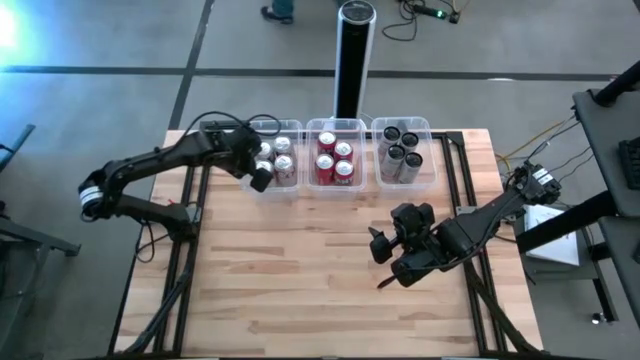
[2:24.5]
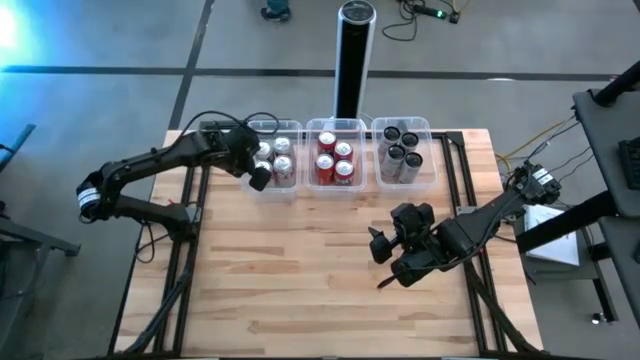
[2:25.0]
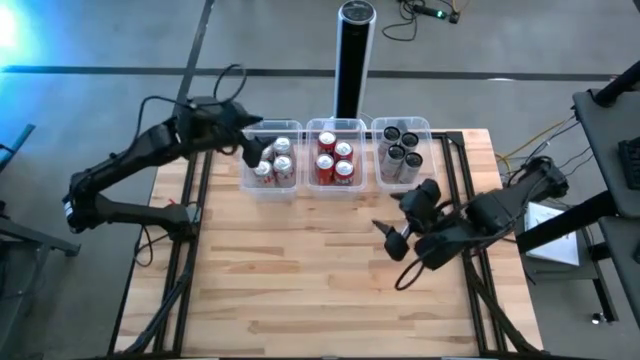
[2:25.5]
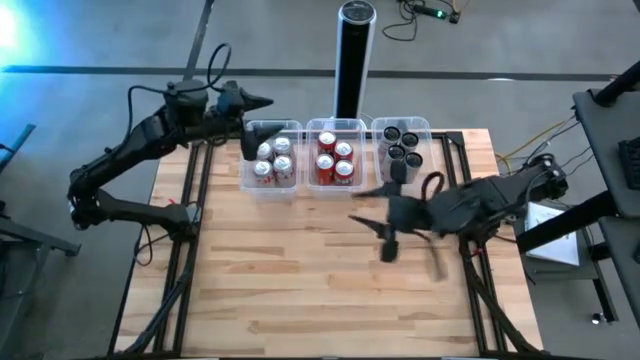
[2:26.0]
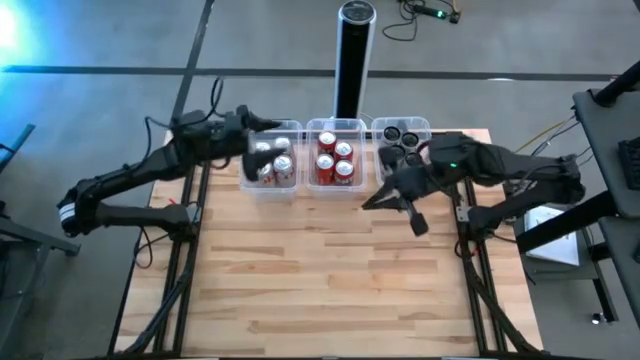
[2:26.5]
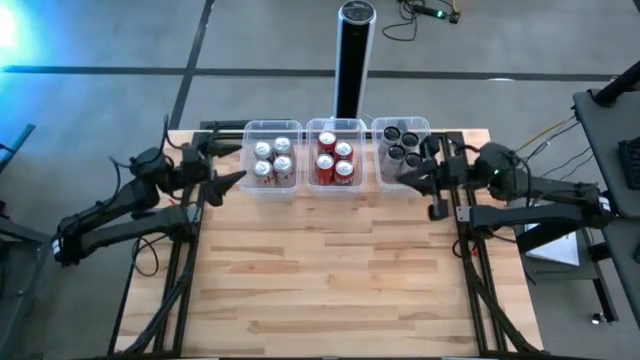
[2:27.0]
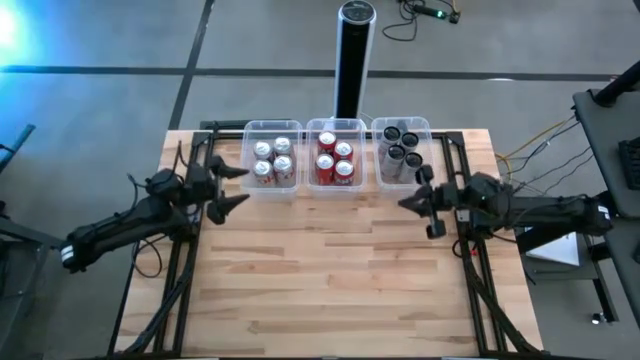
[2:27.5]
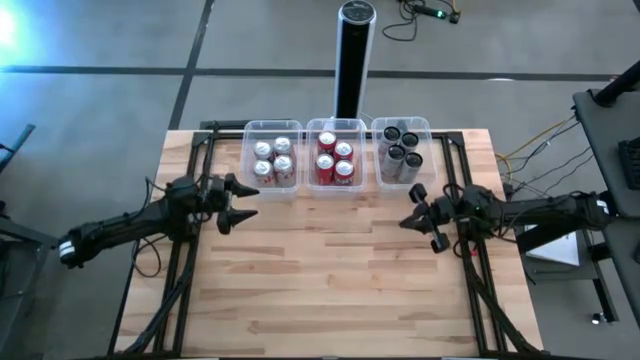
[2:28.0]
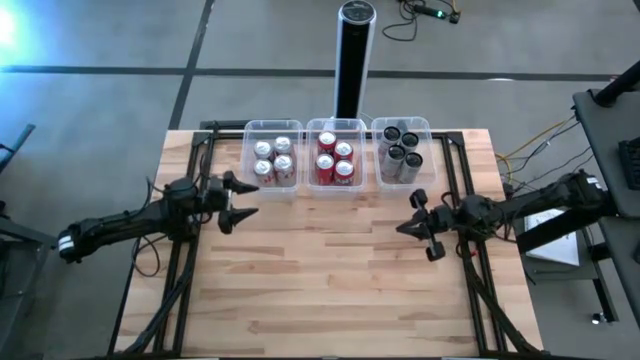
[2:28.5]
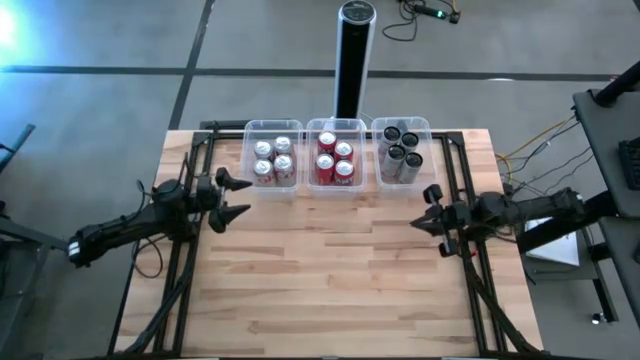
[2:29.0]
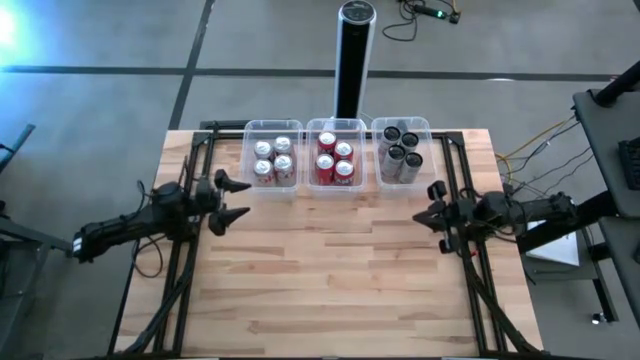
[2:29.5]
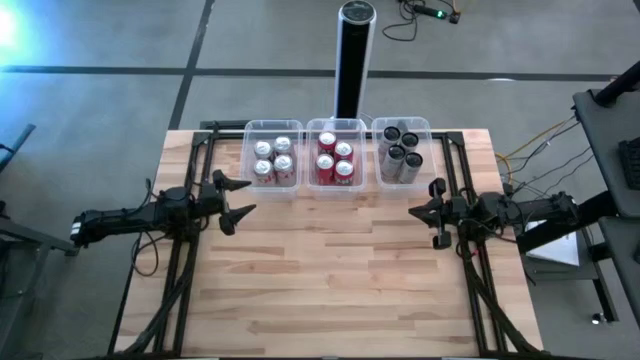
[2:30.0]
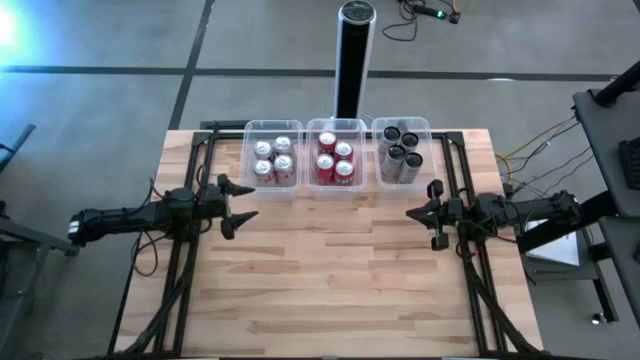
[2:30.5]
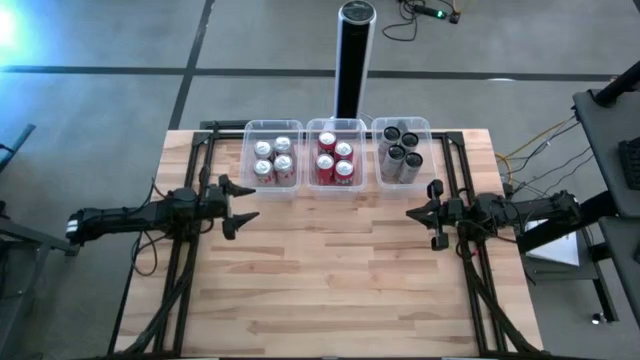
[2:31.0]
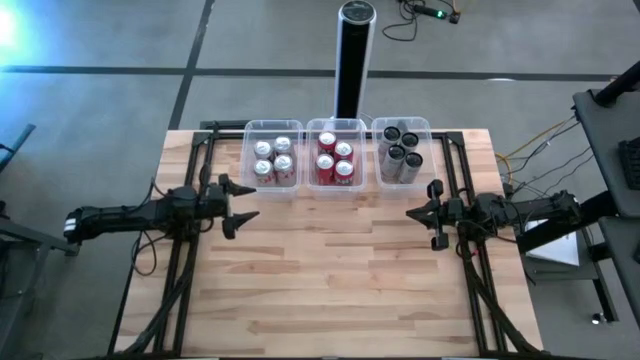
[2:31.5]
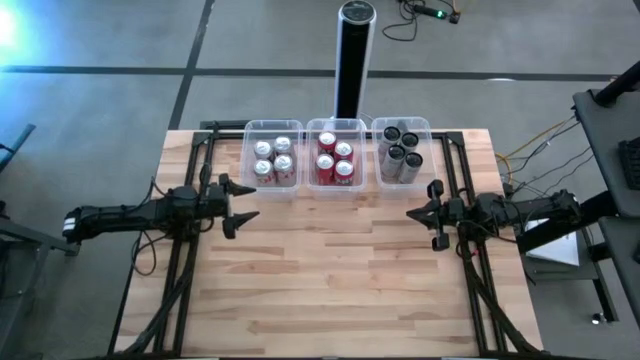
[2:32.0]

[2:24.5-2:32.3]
Task: Sort soda cans
Return to Home Position

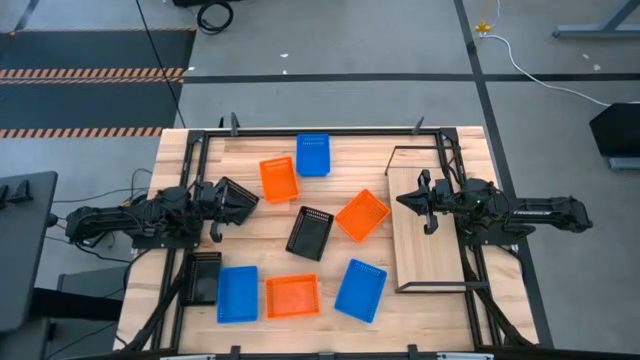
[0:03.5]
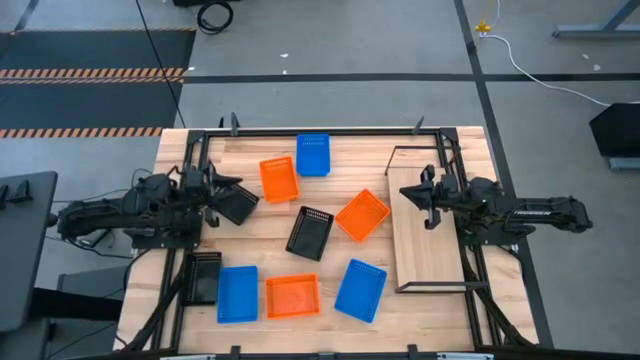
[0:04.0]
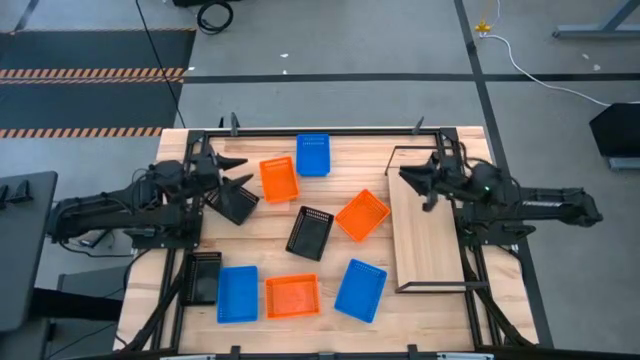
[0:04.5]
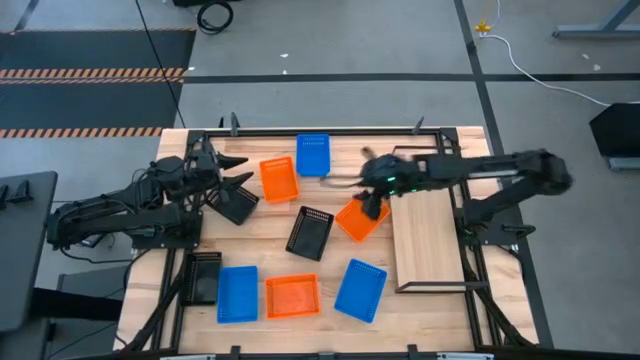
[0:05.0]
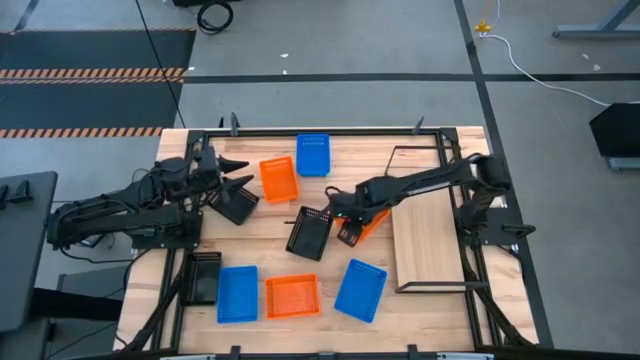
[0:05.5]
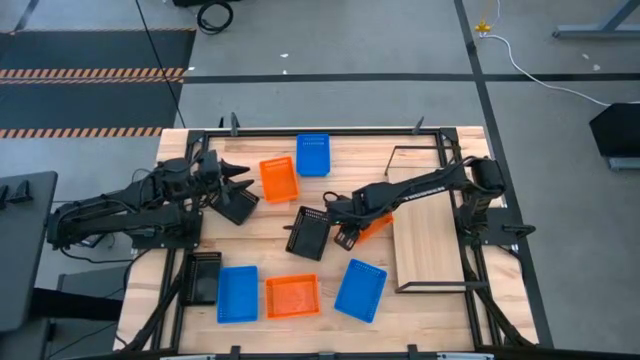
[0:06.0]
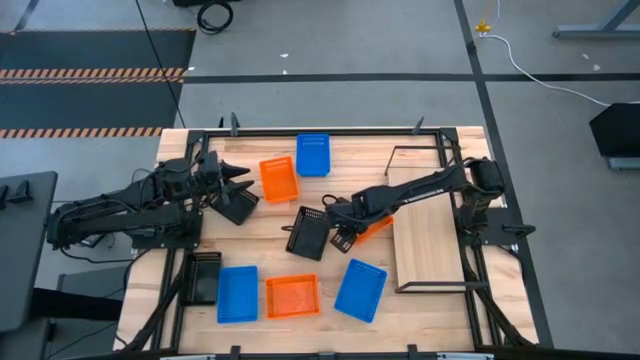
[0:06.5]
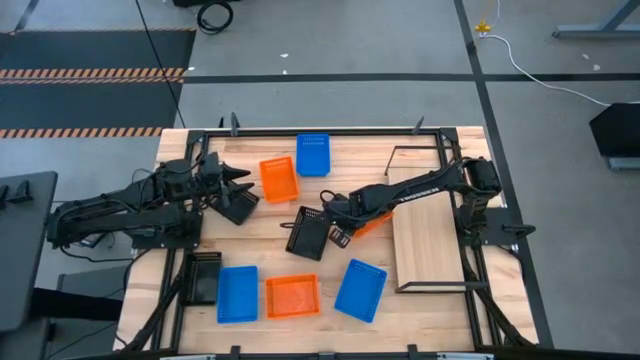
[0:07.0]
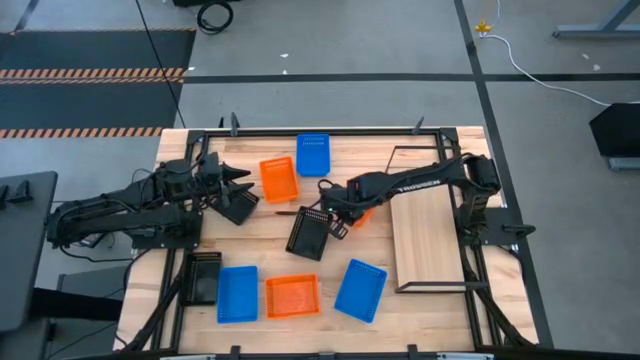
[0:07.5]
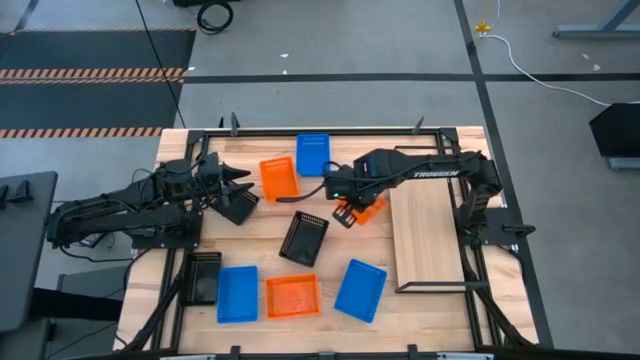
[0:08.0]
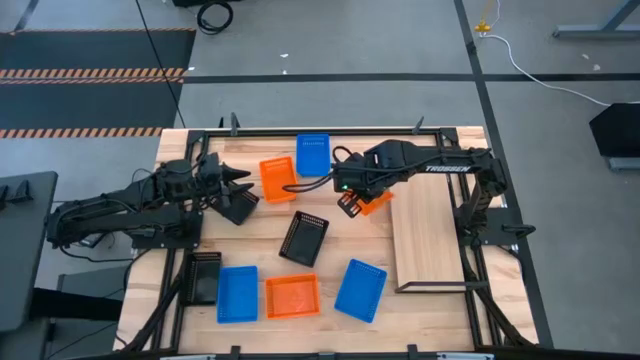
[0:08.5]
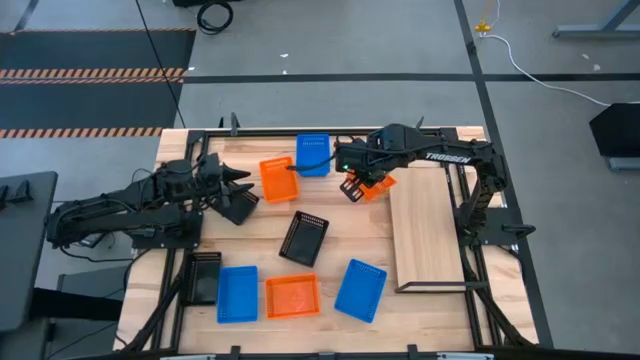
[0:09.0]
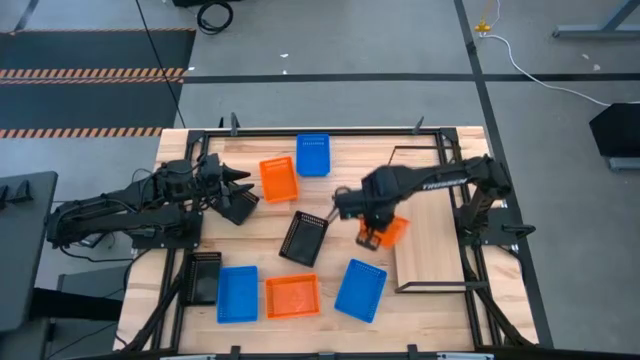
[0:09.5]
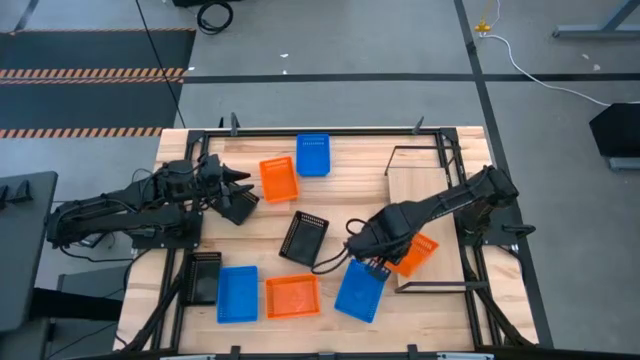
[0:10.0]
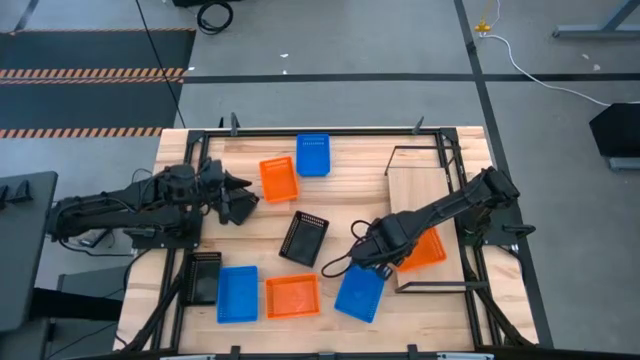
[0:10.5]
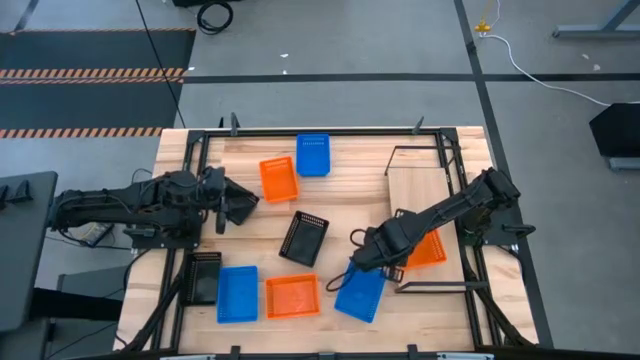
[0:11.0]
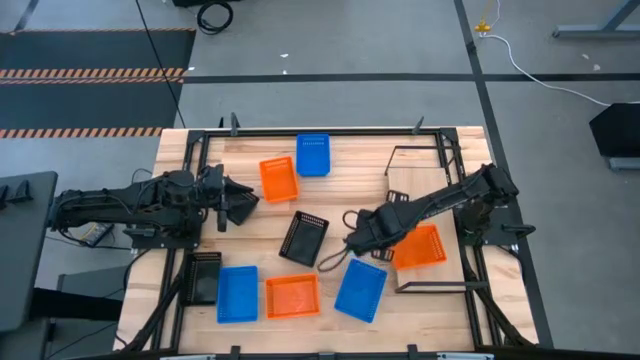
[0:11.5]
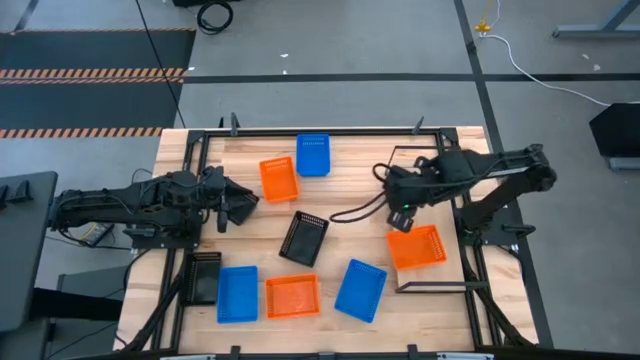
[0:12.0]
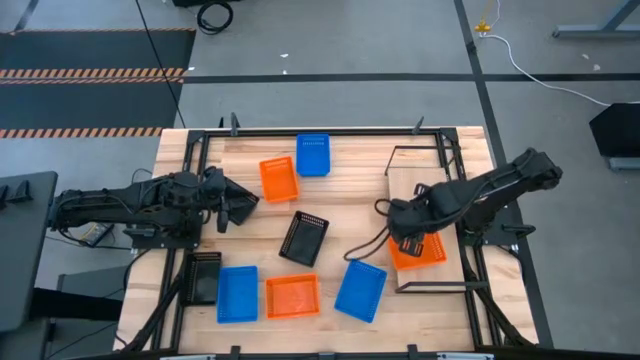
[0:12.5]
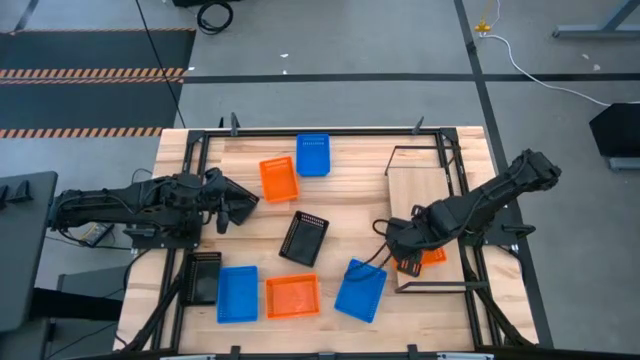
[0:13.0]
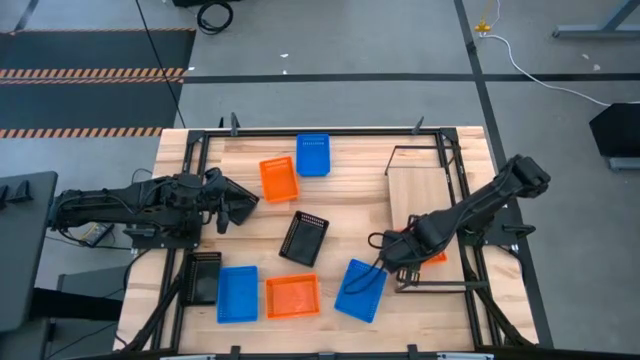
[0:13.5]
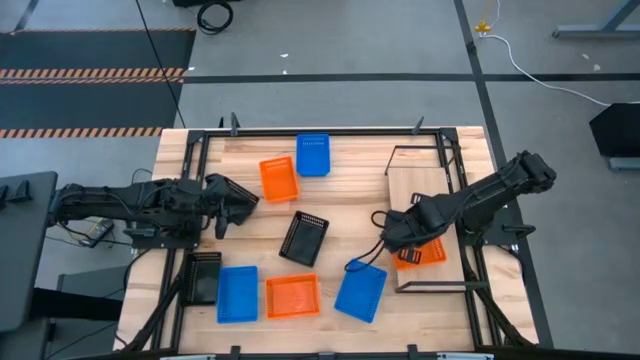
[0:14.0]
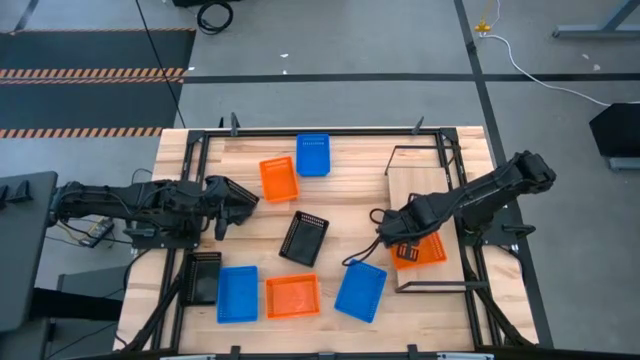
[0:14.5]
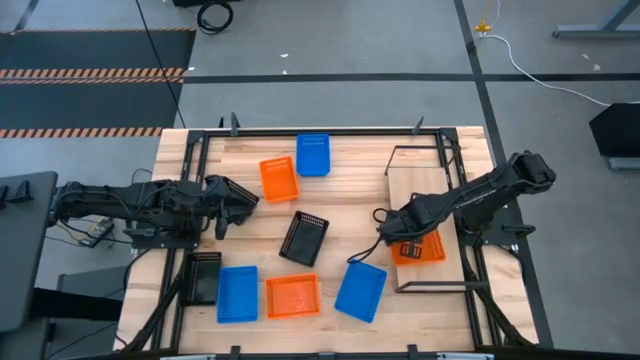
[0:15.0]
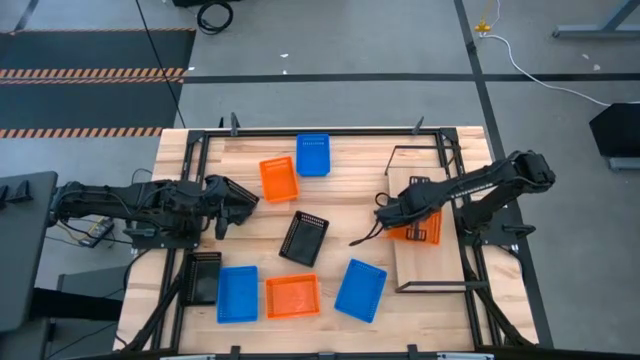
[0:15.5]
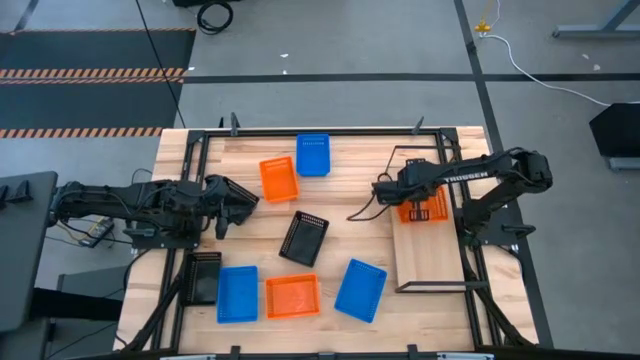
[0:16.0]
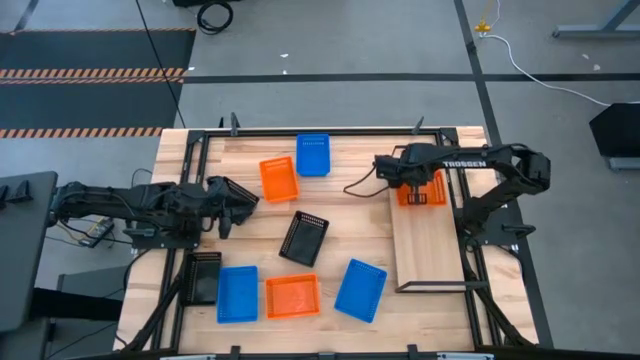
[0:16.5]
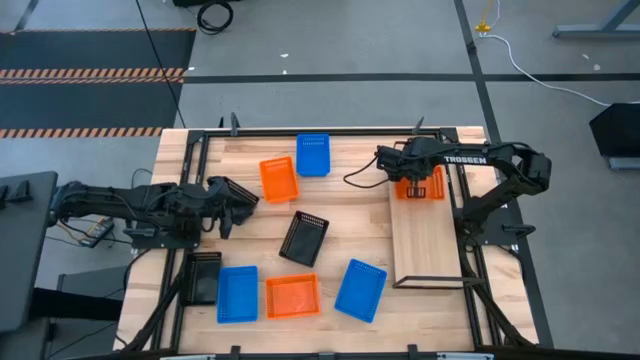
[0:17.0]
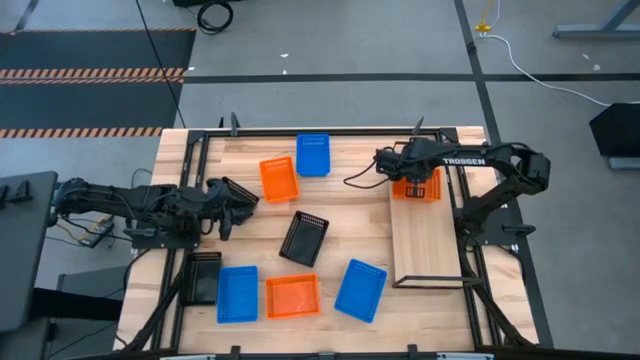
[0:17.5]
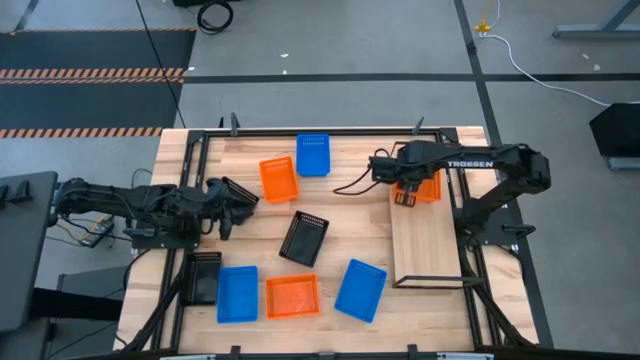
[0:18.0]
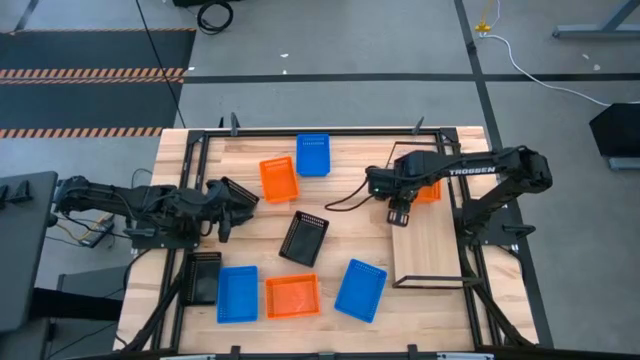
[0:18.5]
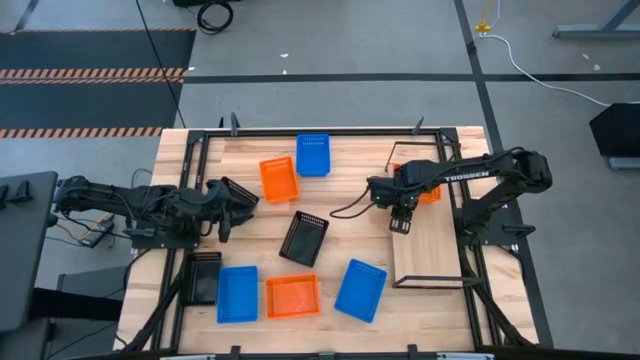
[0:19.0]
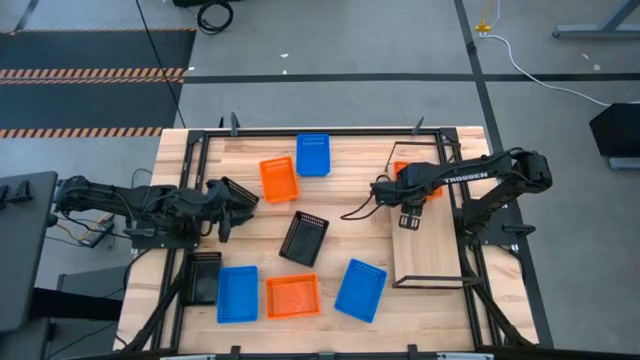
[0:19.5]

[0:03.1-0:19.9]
Task: Stack baskets on shelf by color
Put the right orange bin on the shelf
